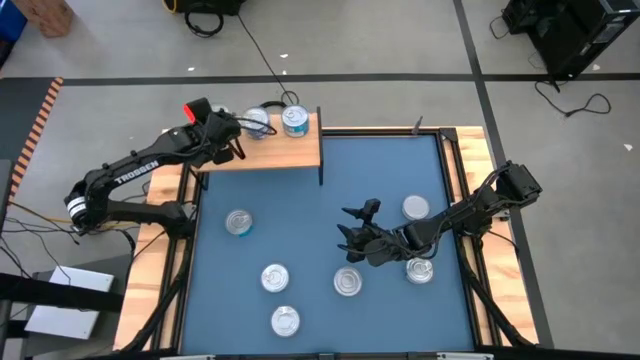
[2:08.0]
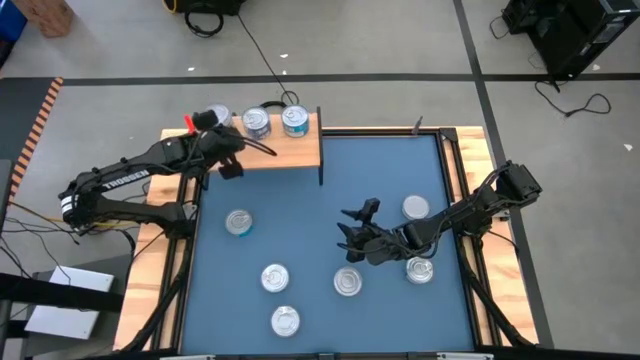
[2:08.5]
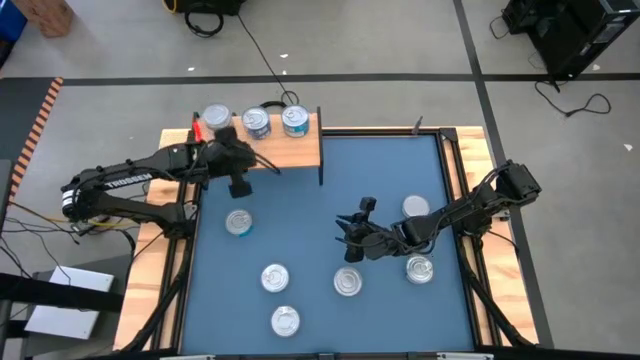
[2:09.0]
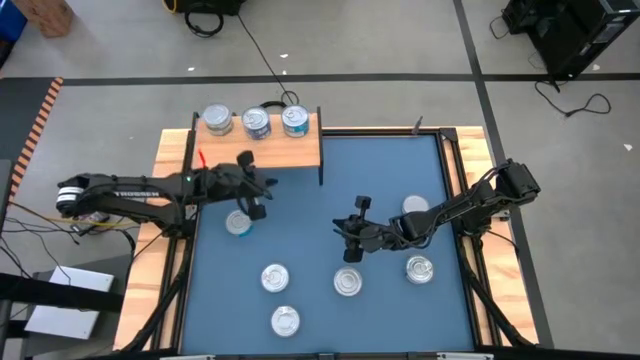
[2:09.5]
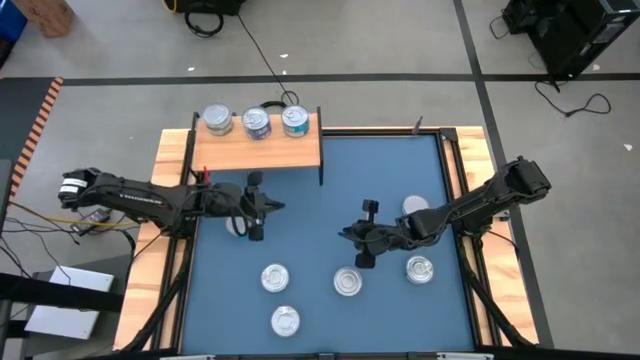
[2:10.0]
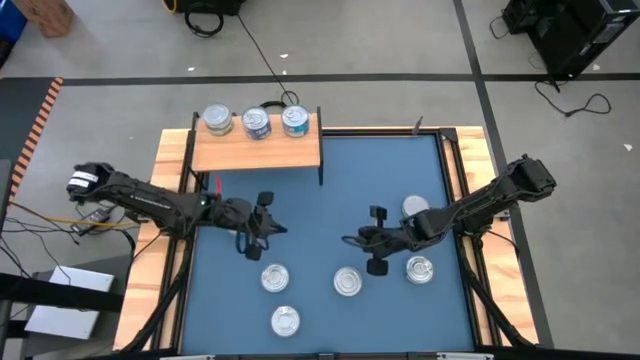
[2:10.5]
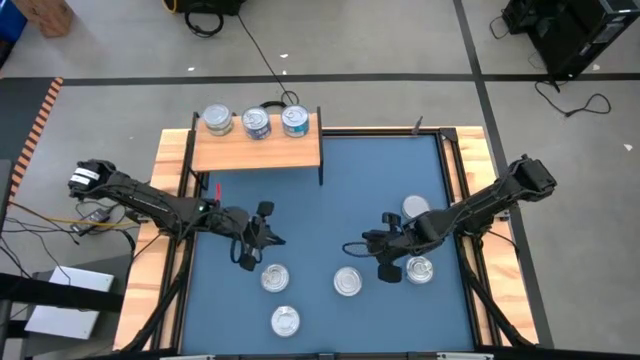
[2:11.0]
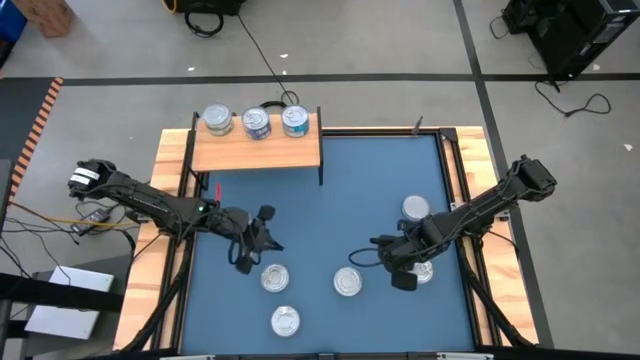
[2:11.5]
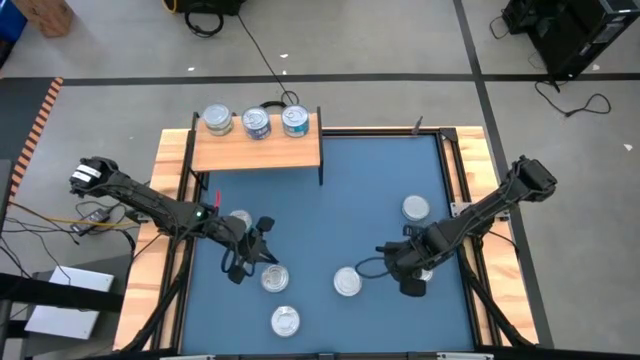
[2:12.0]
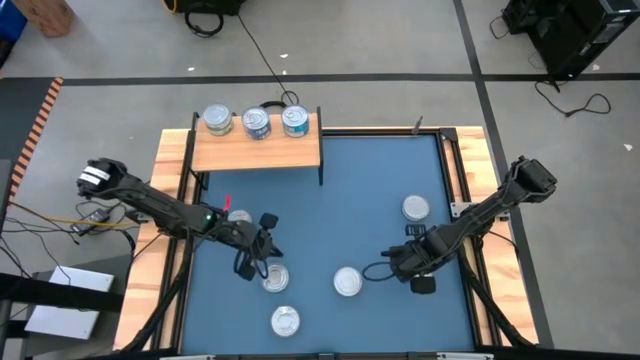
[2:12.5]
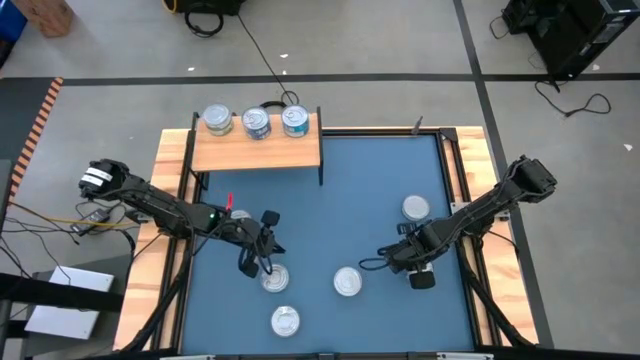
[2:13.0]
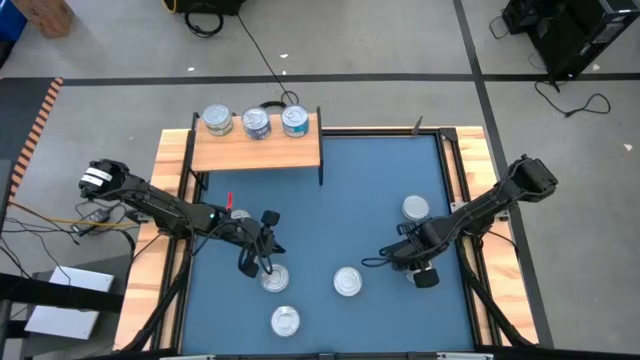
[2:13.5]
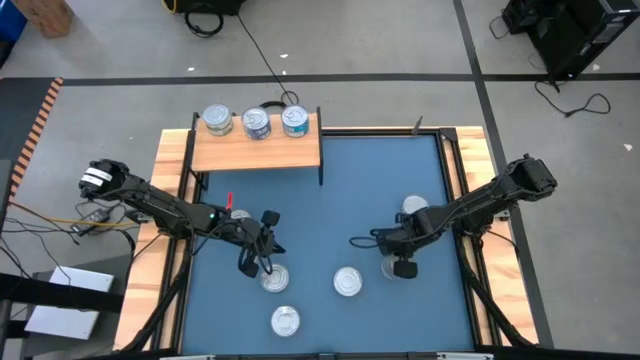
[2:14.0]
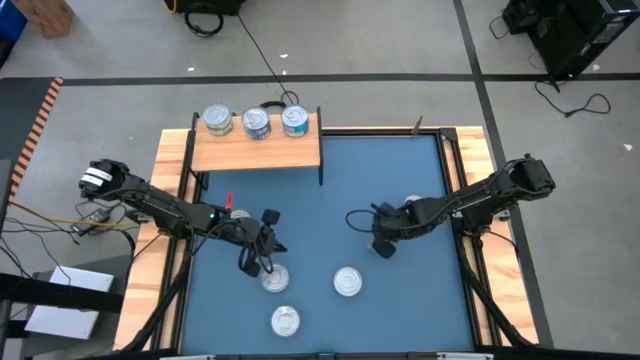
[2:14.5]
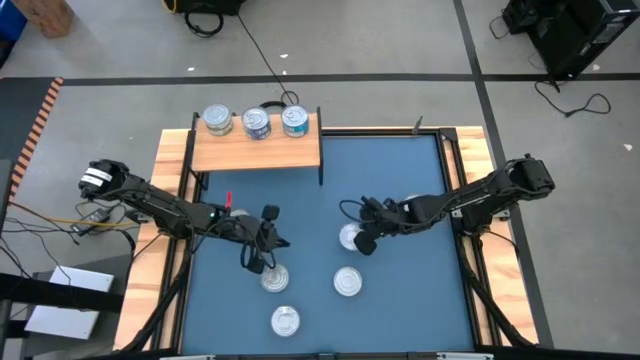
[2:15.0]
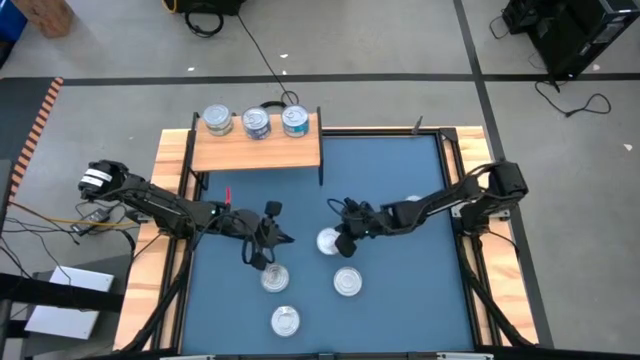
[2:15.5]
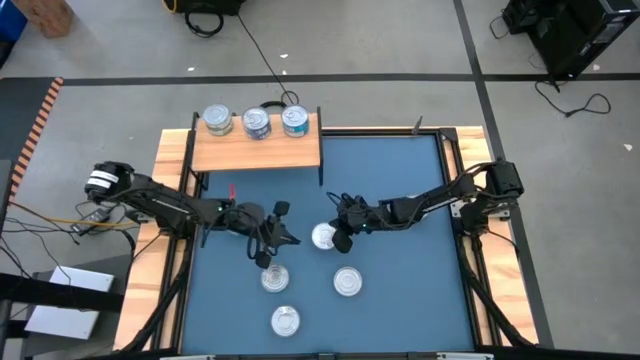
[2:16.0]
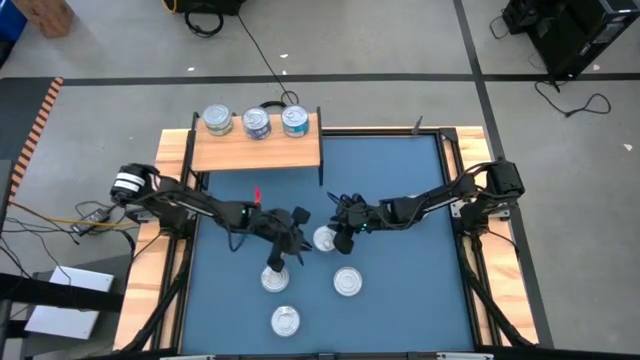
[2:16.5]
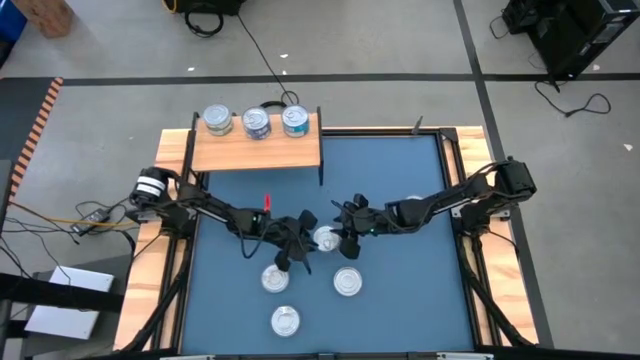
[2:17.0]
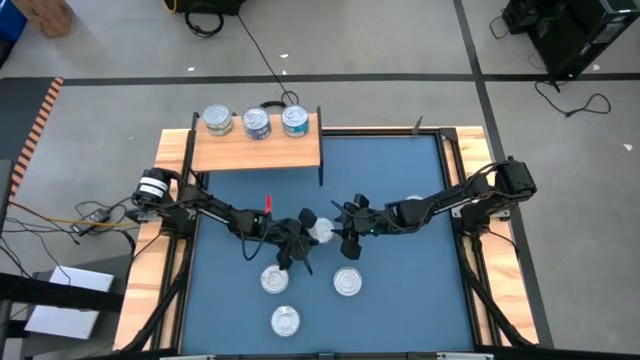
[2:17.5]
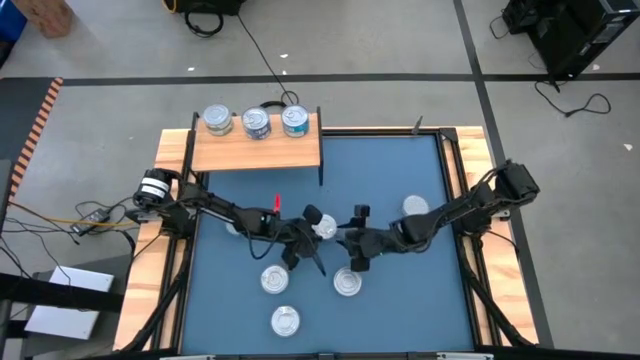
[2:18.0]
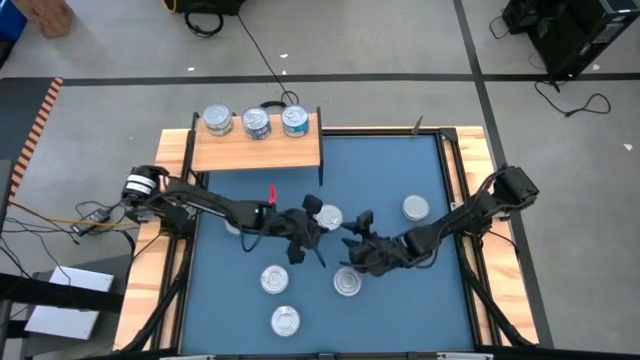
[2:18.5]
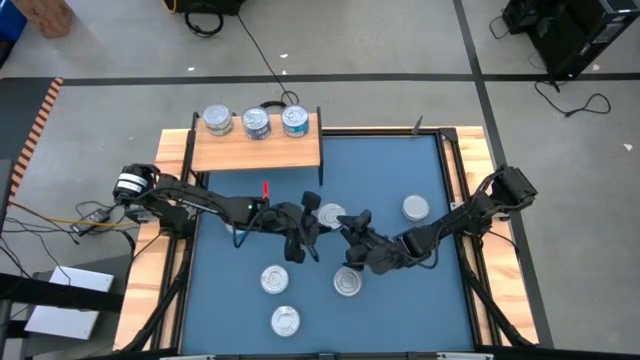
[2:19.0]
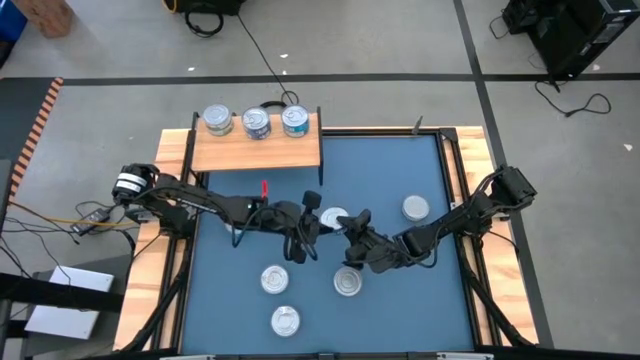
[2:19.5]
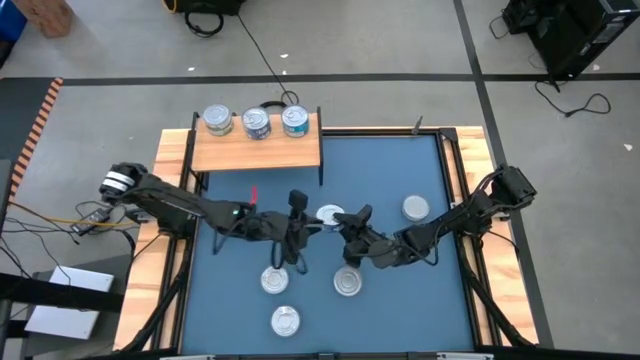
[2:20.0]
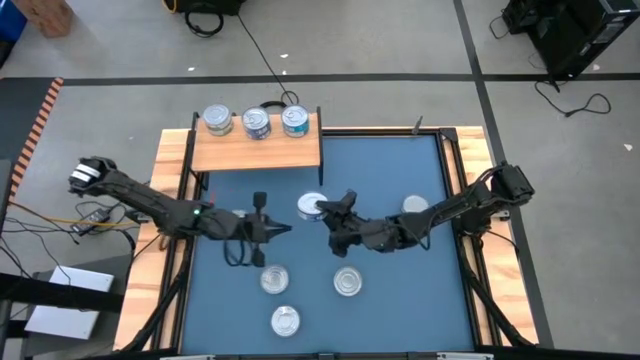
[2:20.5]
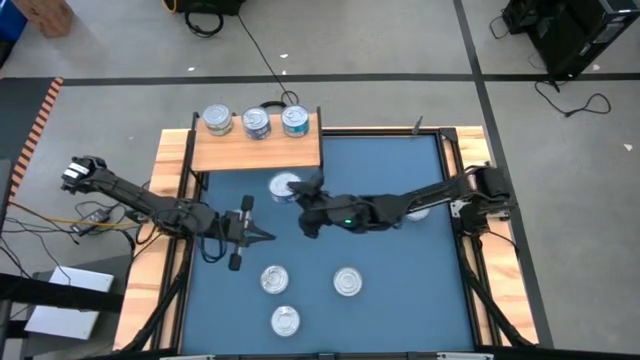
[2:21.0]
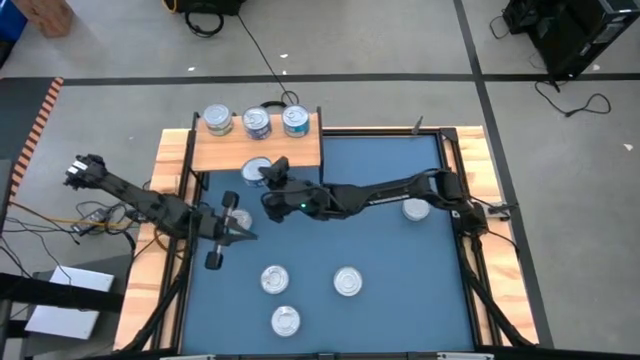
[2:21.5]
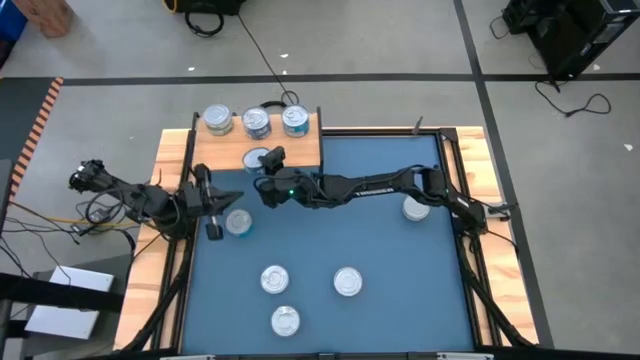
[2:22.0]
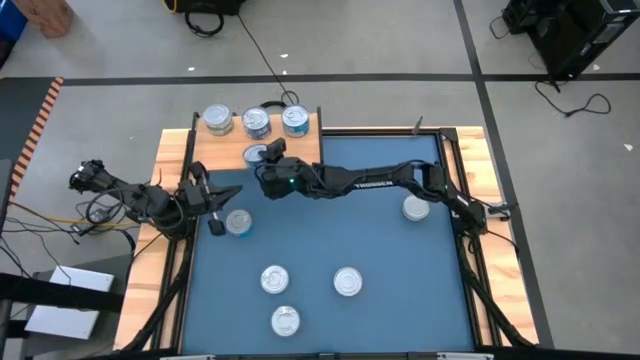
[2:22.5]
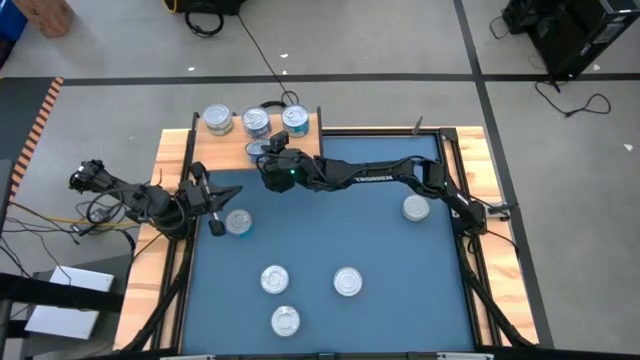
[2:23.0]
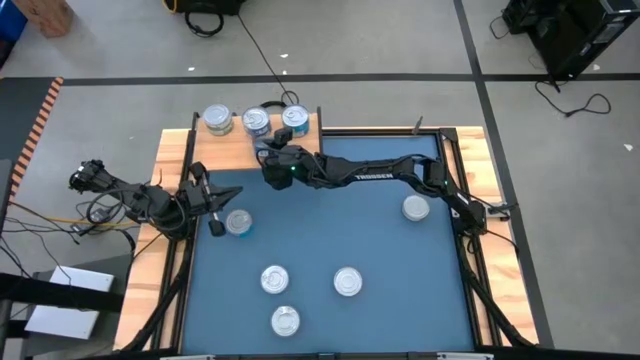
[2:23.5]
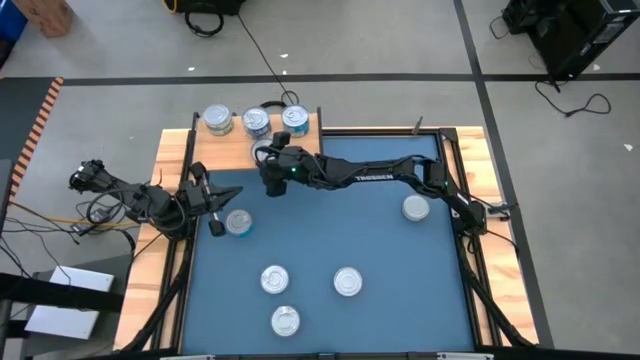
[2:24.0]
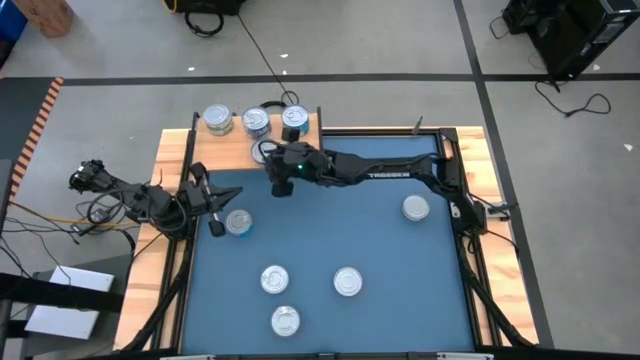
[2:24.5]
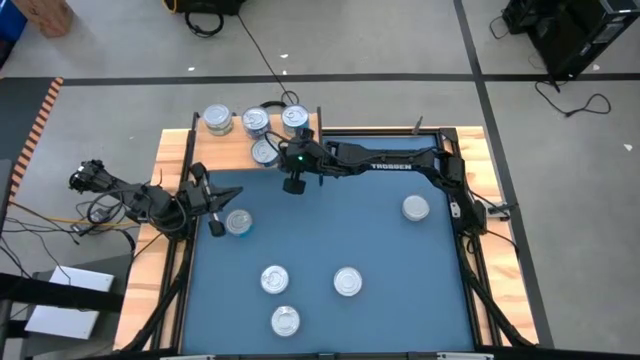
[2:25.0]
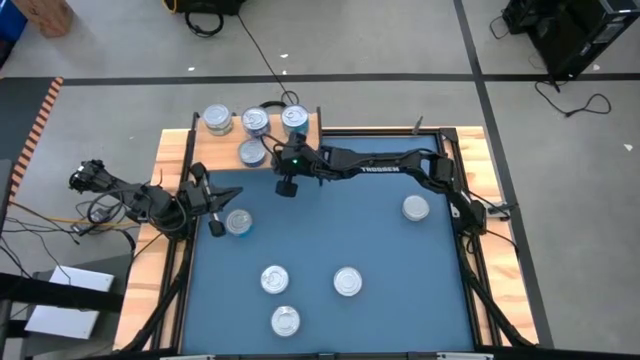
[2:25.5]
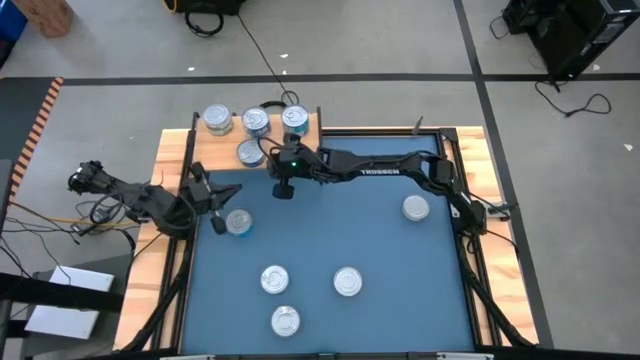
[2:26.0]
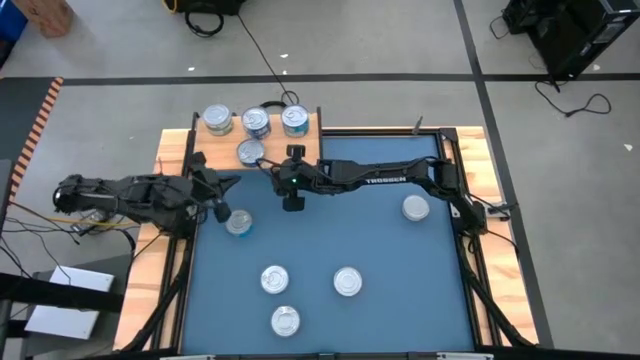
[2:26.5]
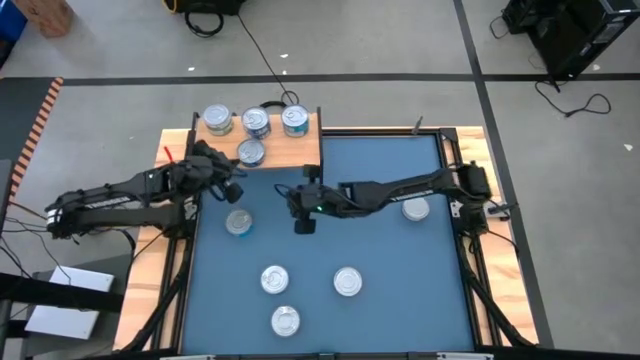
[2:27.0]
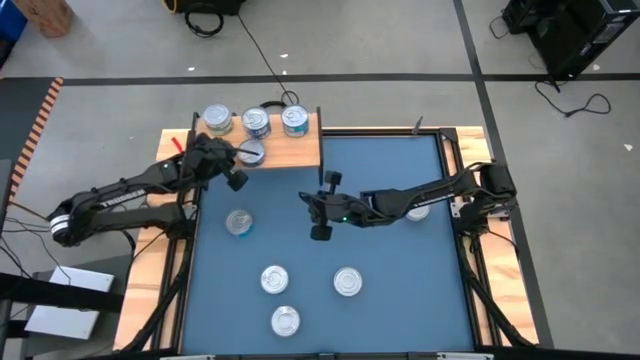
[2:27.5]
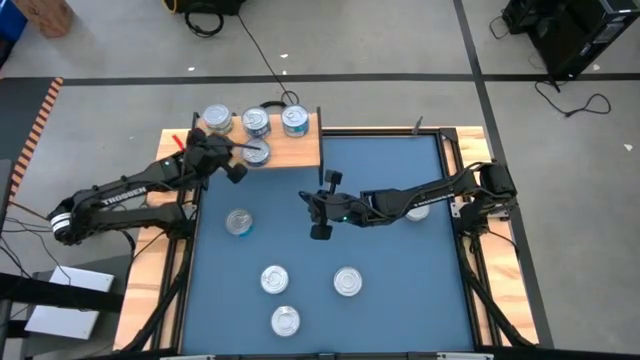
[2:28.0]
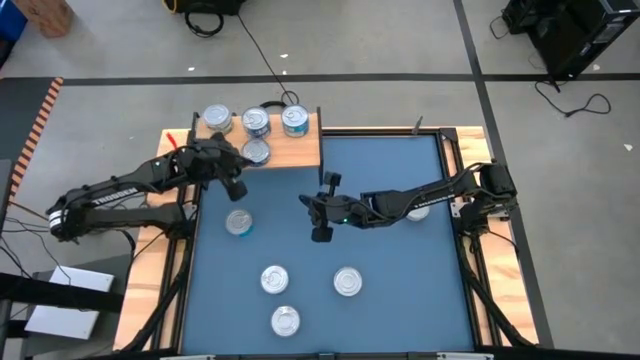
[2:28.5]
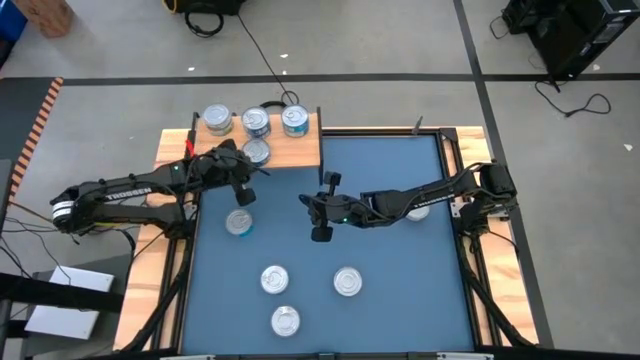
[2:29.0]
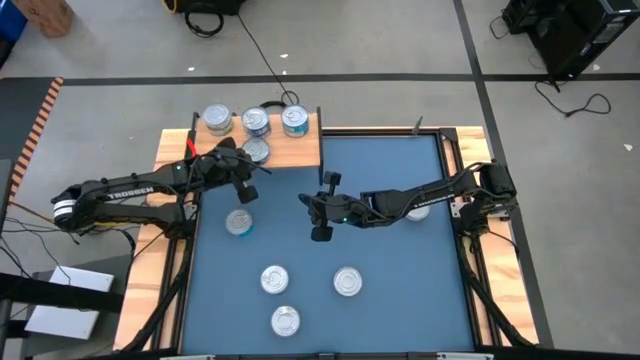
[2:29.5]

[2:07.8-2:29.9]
Task: Stack canned seafood by type on shelf
Put the blue tuna can on the shelf aligned with the other blue tuna cans
